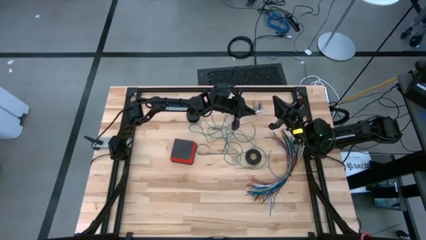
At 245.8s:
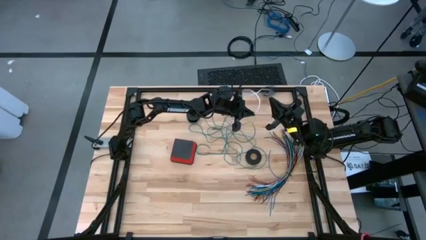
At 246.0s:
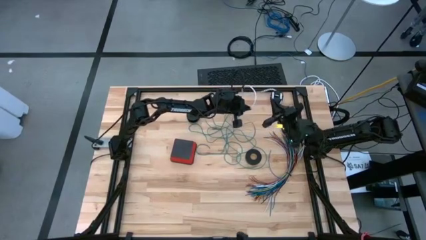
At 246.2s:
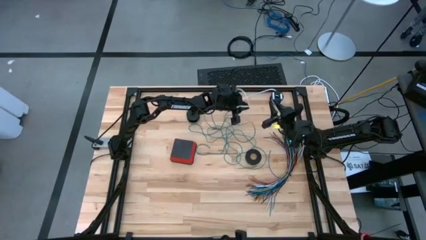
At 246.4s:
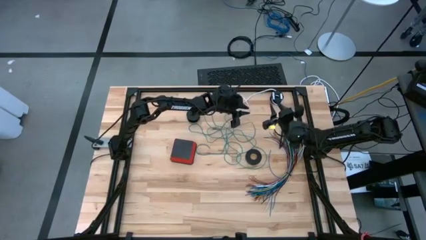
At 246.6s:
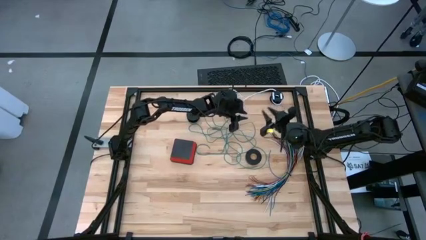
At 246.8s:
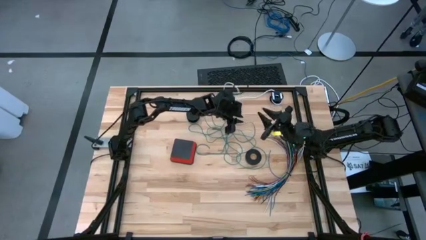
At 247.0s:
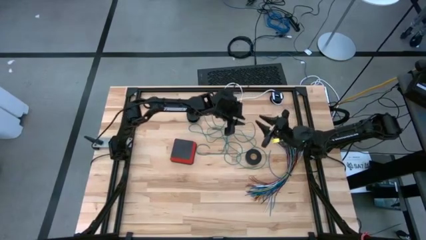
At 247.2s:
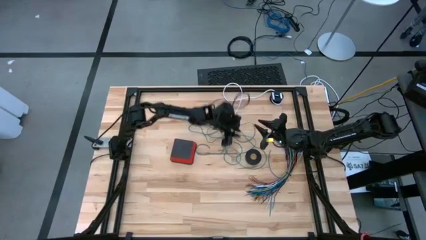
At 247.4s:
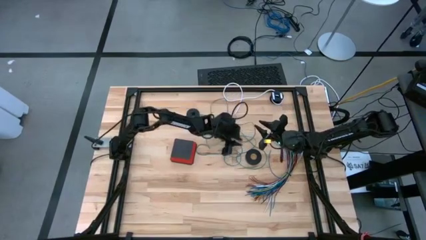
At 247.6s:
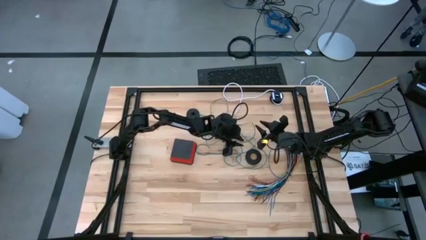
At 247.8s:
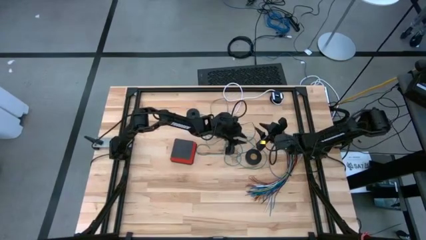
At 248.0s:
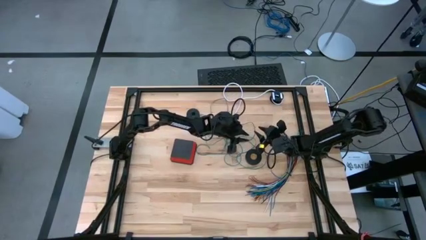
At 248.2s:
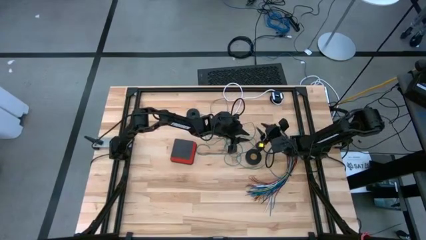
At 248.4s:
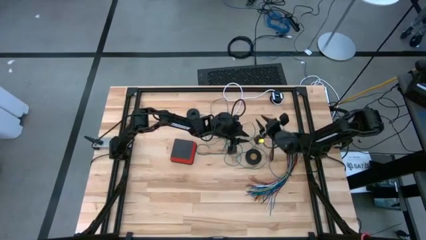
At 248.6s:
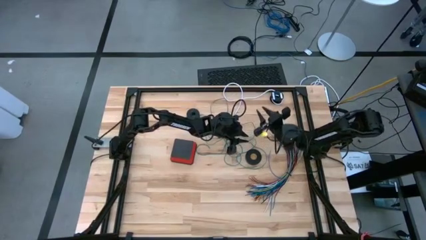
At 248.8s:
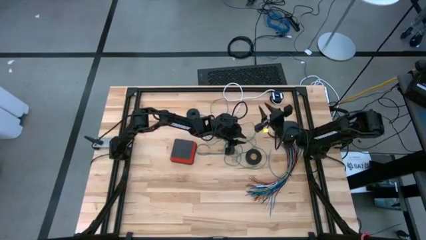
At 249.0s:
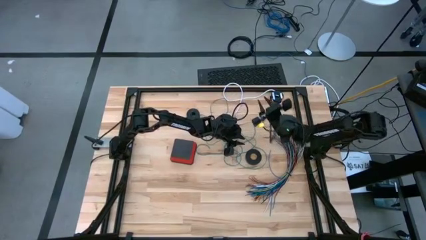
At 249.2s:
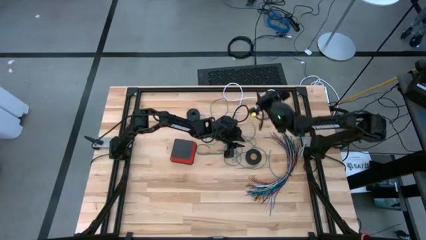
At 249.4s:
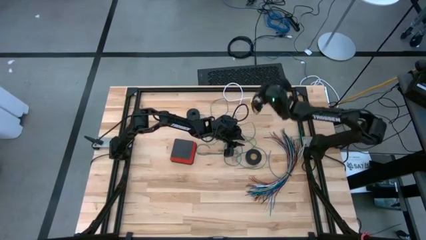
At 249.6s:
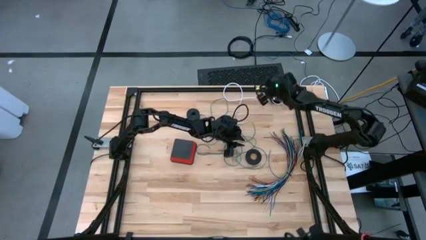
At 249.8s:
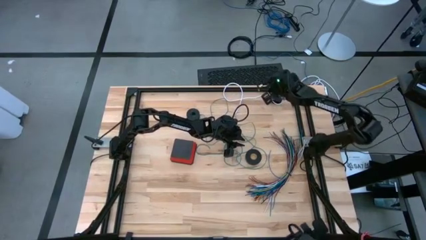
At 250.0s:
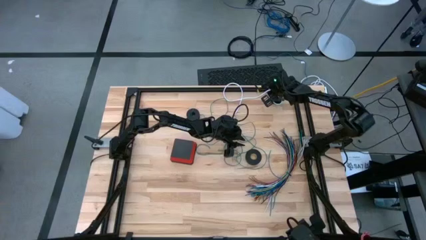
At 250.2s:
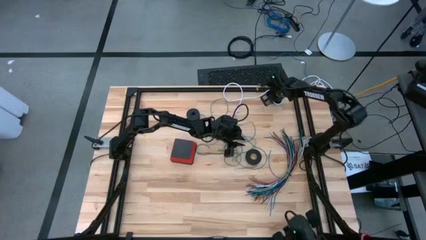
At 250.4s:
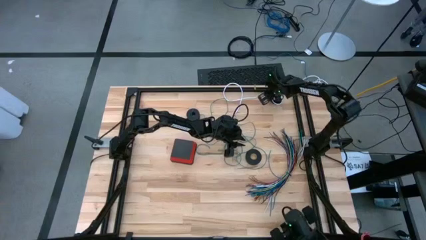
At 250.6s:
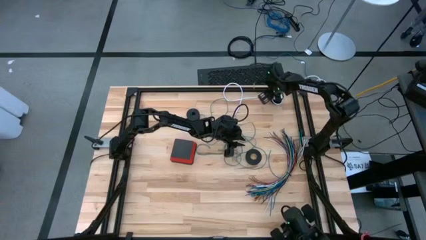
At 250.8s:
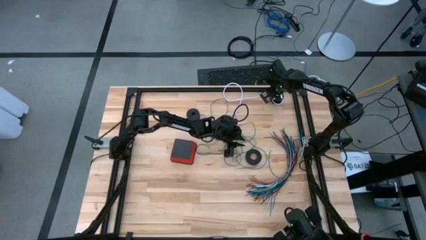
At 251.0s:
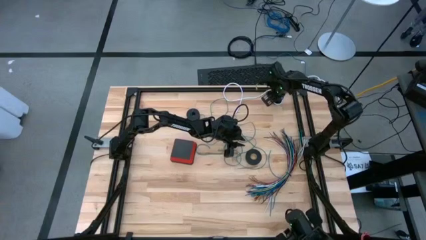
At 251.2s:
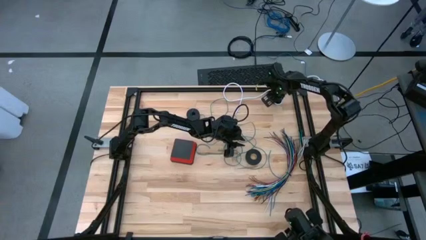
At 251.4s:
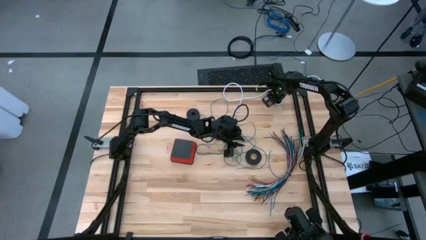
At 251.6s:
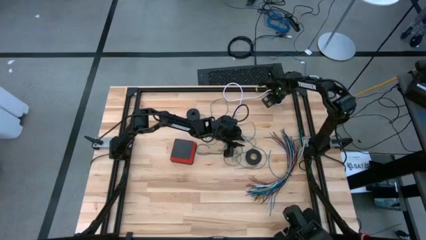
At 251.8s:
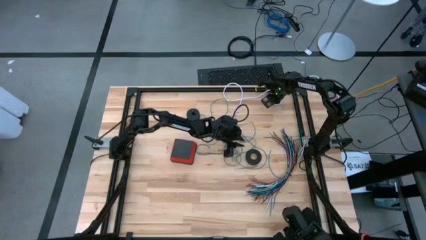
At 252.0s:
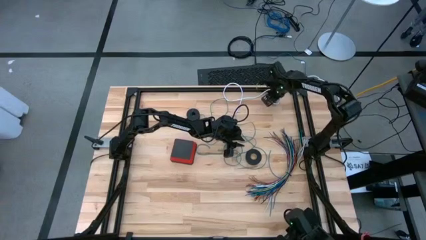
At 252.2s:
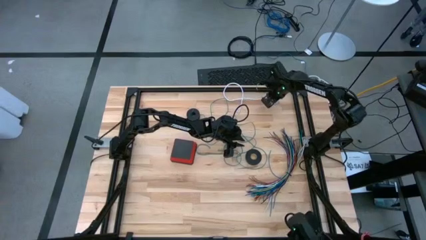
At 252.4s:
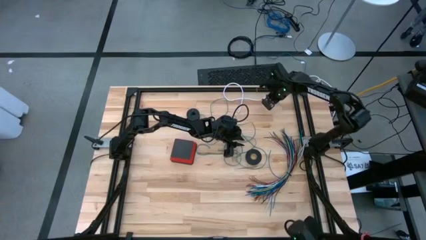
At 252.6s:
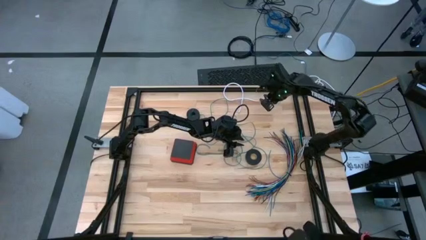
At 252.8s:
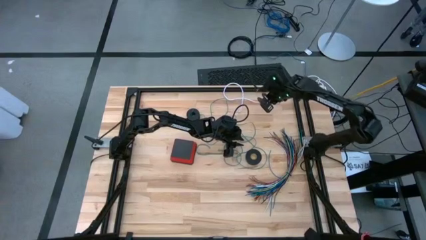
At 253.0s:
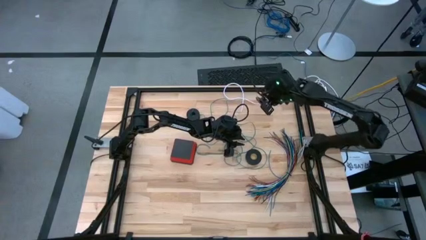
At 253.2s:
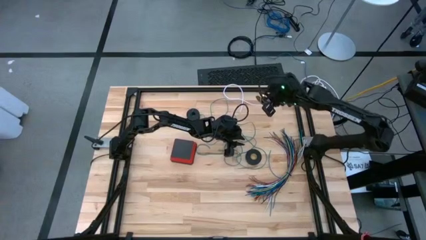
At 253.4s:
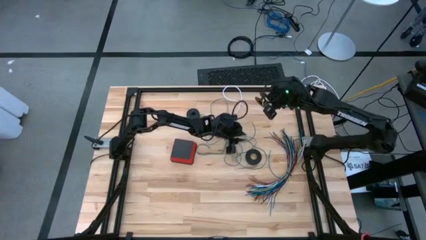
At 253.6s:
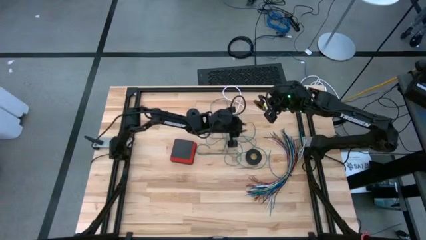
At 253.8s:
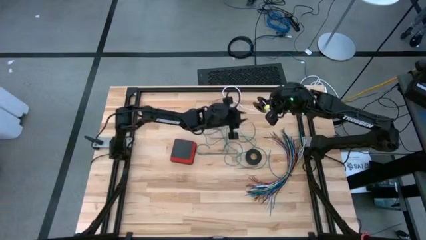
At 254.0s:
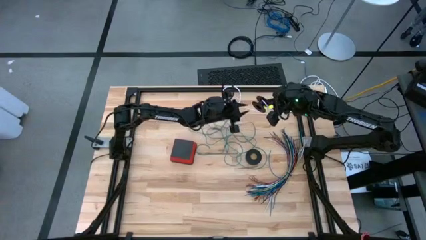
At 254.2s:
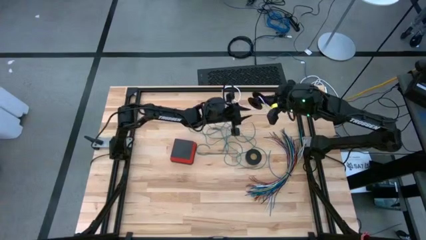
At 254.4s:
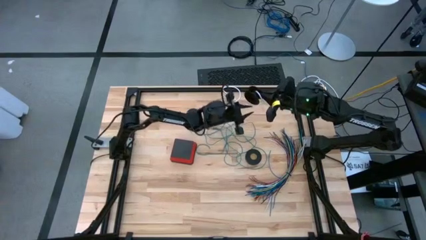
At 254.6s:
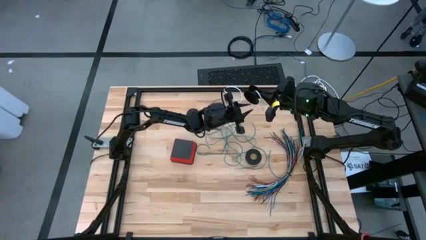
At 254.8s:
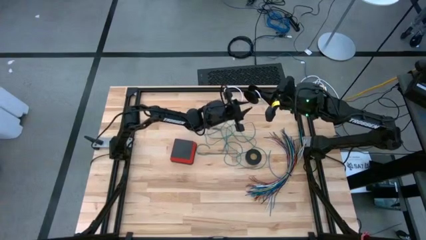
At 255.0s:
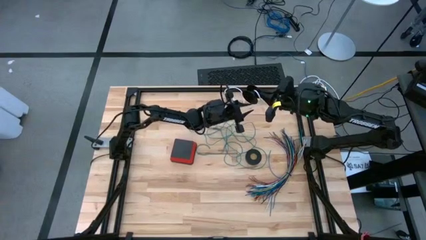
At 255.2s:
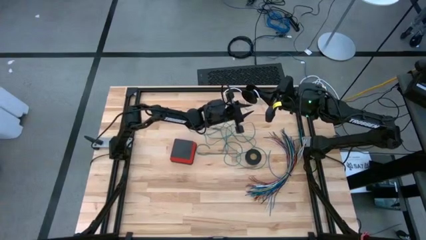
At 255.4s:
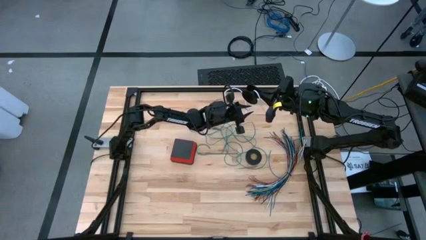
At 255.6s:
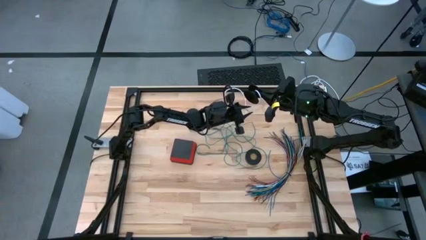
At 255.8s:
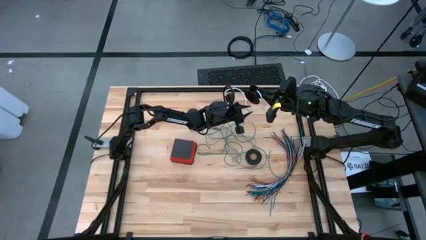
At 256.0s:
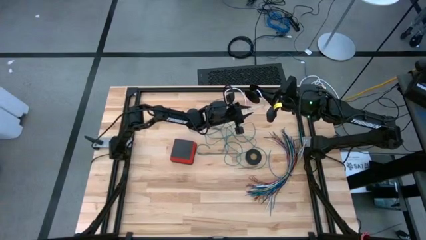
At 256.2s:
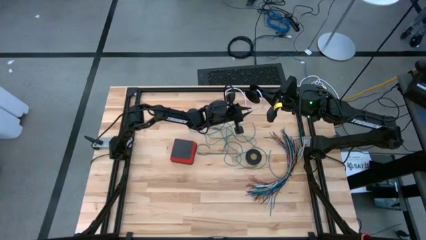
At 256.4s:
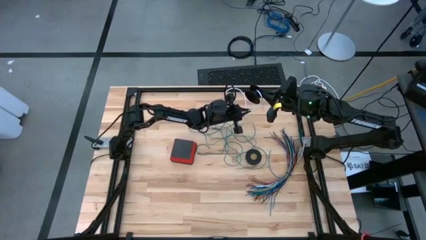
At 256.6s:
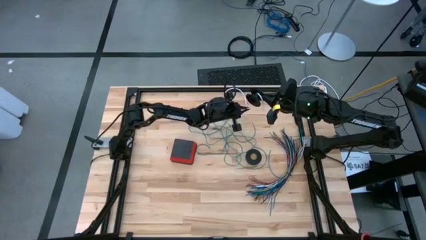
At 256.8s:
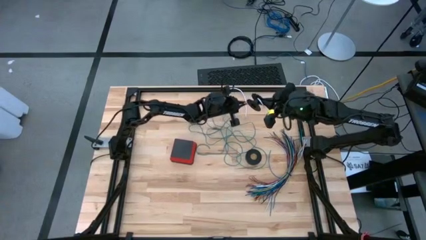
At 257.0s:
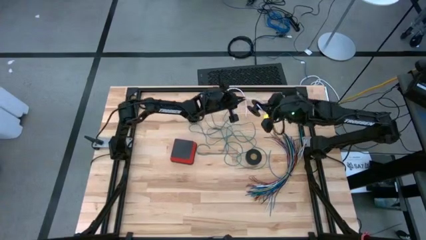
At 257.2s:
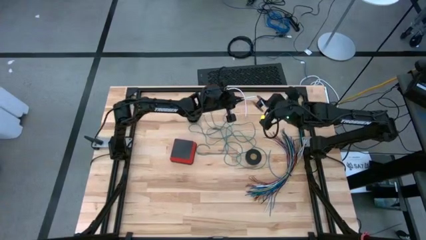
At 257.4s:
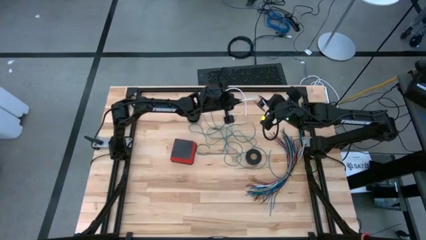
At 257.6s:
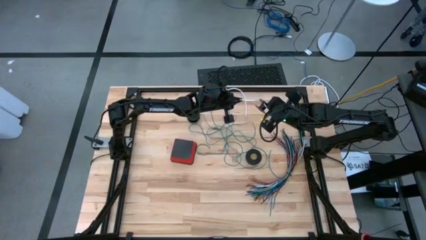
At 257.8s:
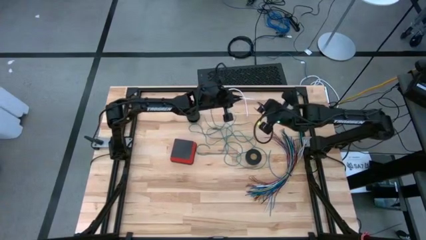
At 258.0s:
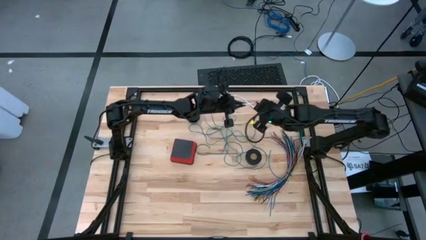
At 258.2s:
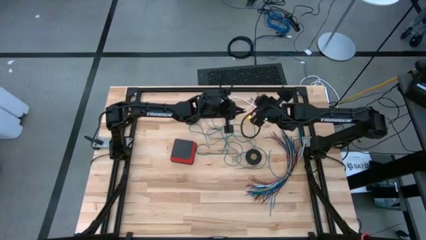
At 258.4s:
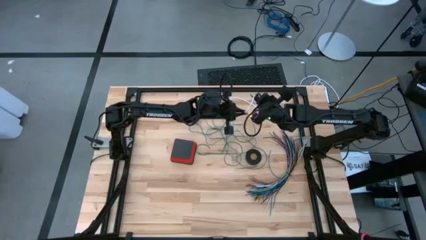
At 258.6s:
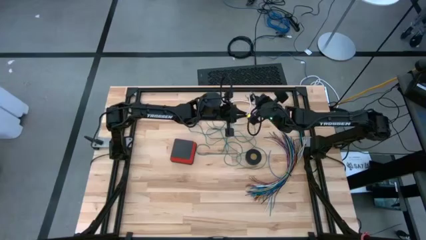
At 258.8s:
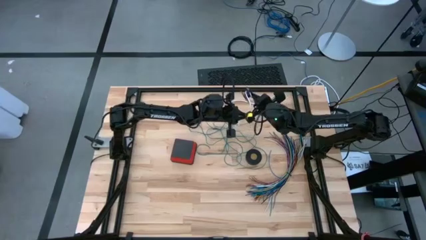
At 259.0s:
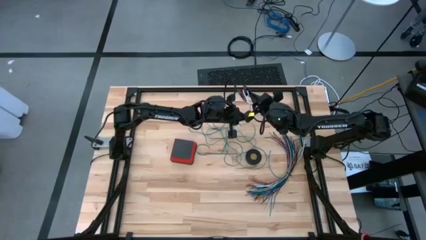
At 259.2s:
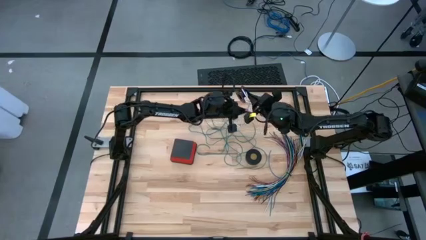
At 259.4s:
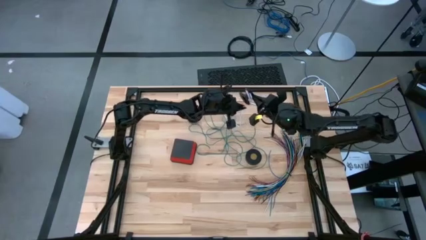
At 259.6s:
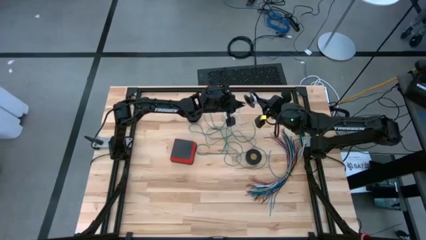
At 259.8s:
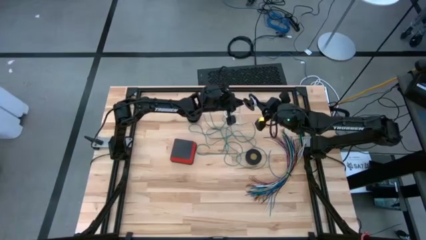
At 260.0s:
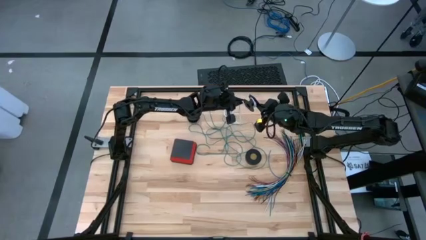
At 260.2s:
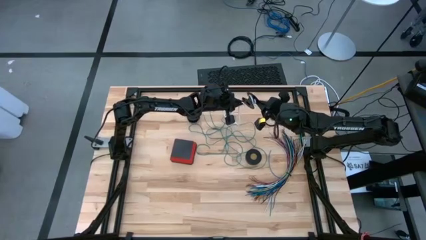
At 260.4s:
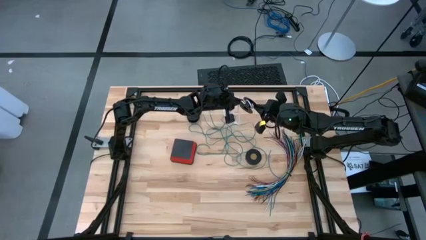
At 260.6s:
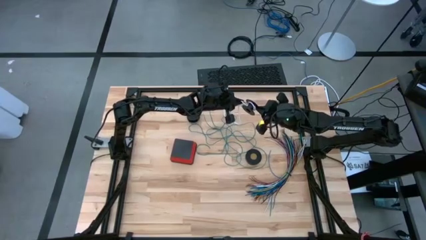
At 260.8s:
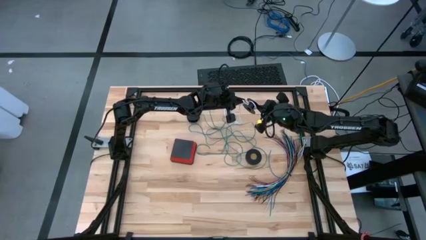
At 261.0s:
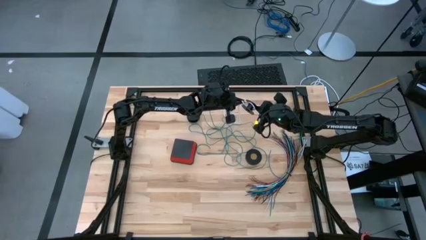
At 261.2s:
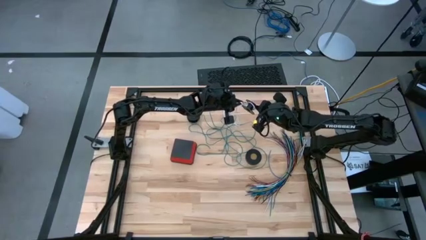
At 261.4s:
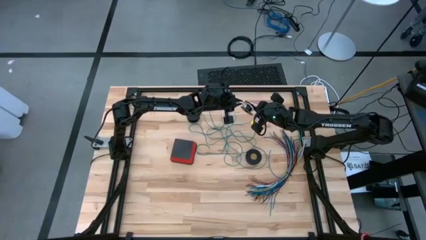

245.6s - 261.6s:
Task: Coiling cords
Coil the white wire cable on the spool
